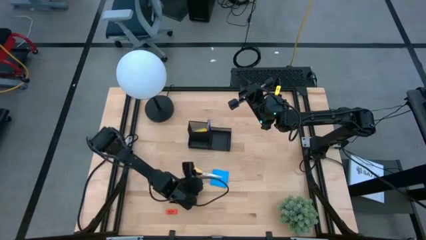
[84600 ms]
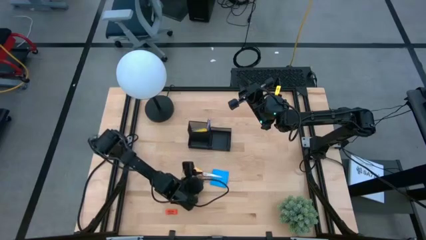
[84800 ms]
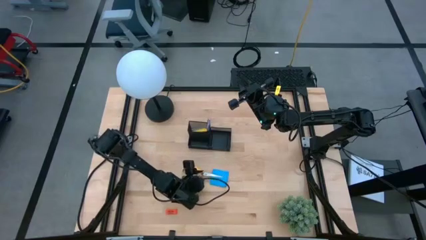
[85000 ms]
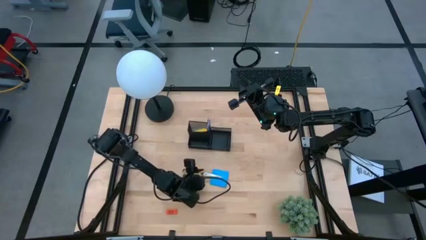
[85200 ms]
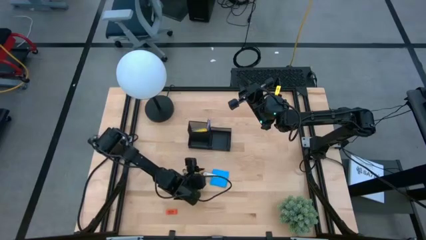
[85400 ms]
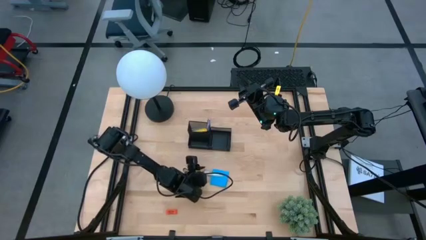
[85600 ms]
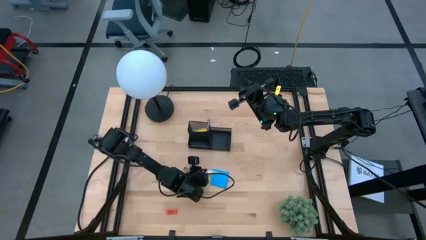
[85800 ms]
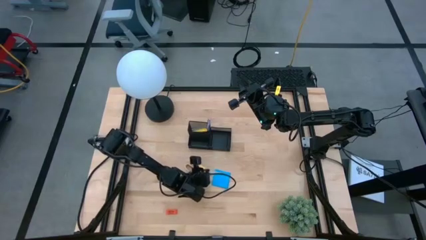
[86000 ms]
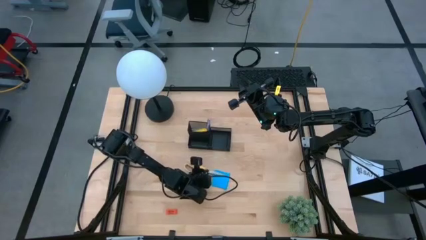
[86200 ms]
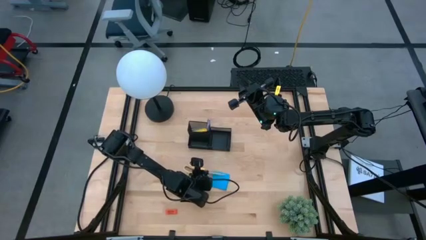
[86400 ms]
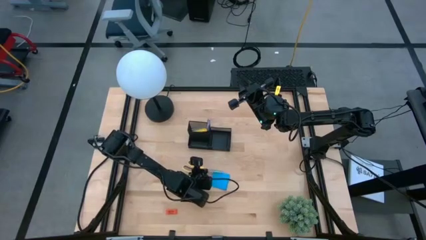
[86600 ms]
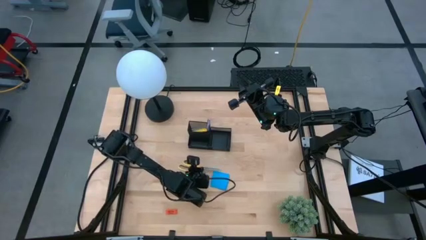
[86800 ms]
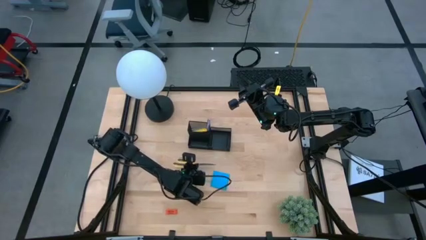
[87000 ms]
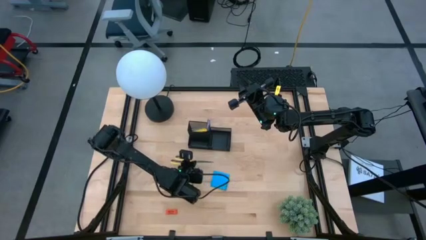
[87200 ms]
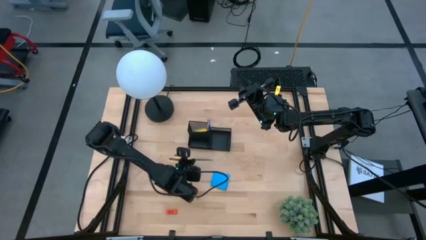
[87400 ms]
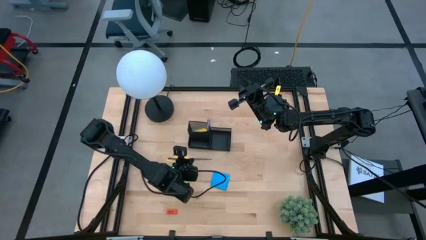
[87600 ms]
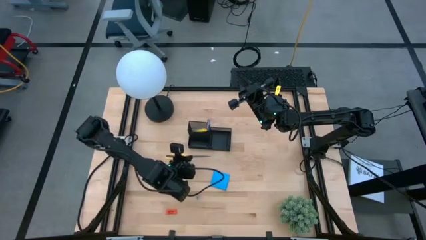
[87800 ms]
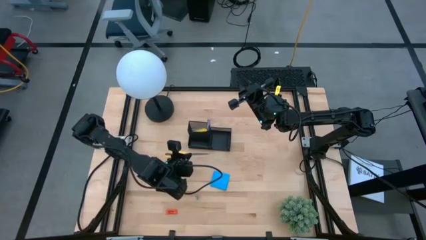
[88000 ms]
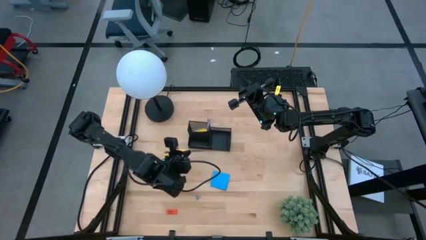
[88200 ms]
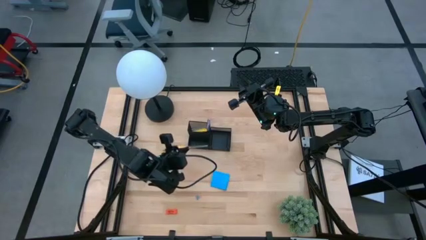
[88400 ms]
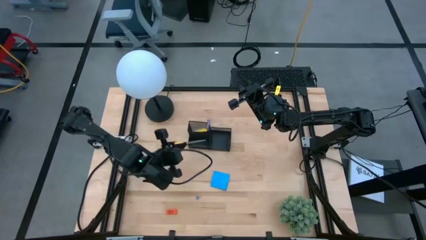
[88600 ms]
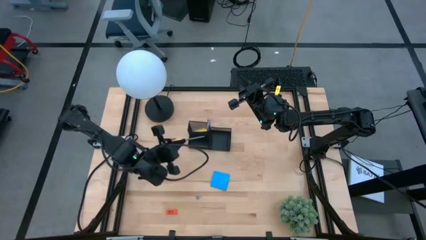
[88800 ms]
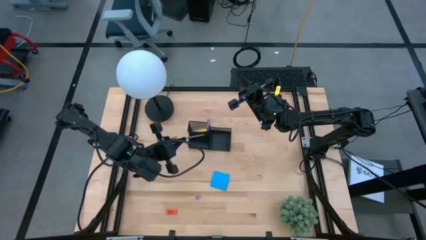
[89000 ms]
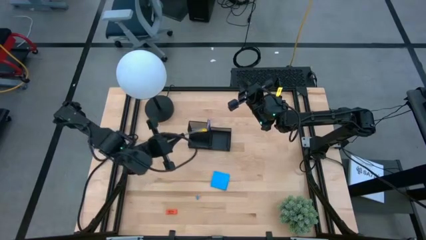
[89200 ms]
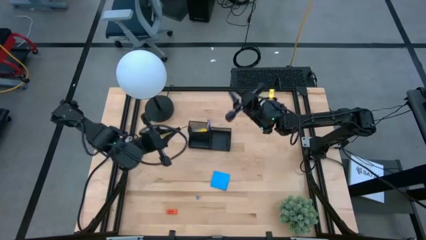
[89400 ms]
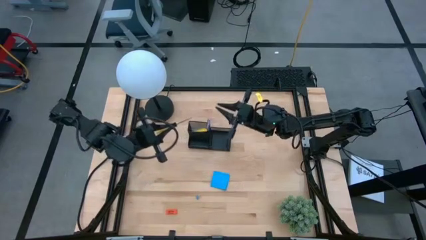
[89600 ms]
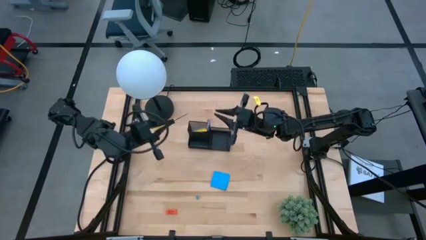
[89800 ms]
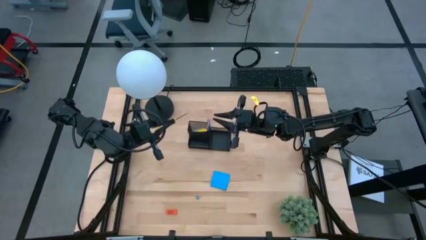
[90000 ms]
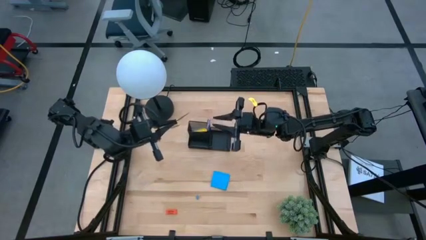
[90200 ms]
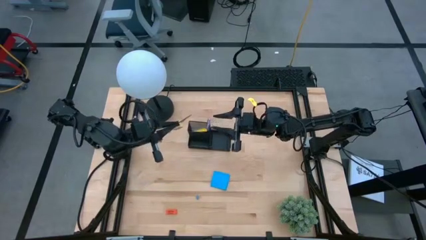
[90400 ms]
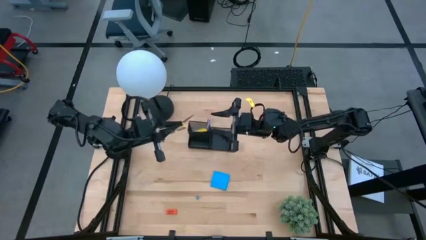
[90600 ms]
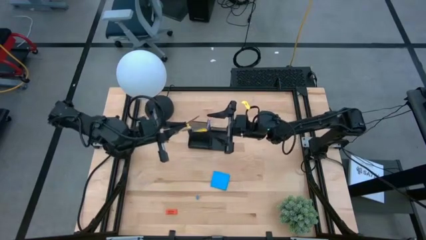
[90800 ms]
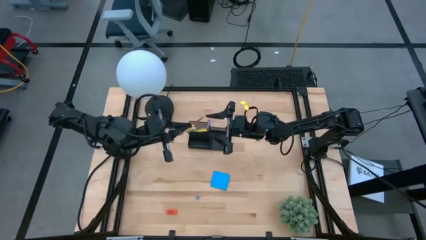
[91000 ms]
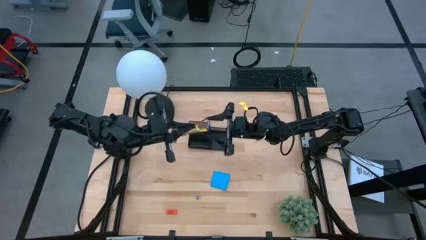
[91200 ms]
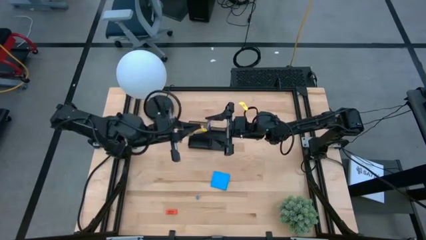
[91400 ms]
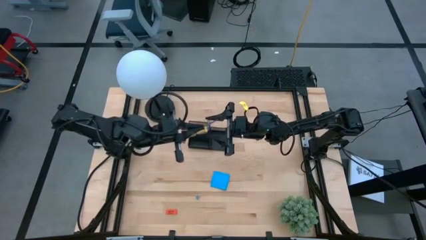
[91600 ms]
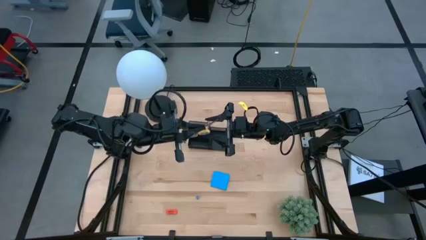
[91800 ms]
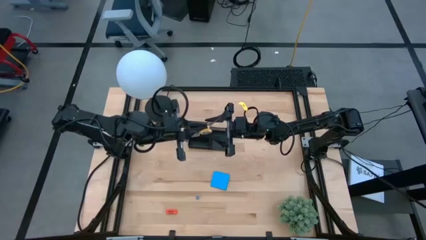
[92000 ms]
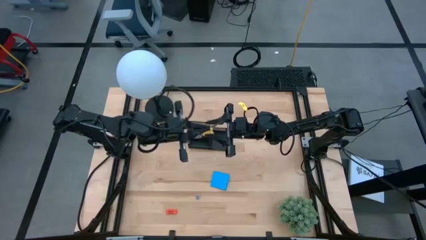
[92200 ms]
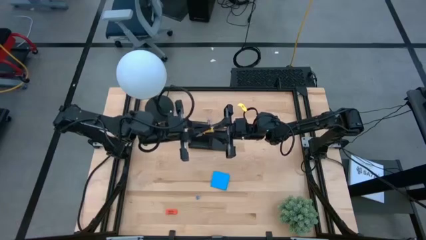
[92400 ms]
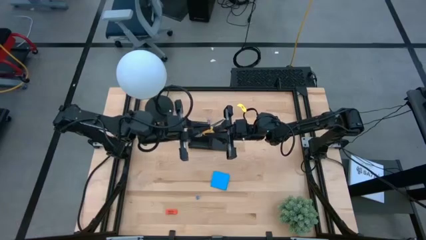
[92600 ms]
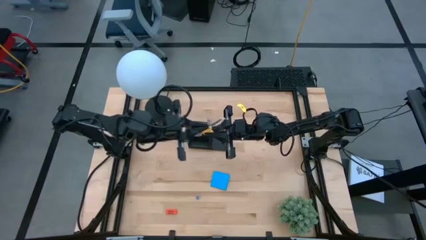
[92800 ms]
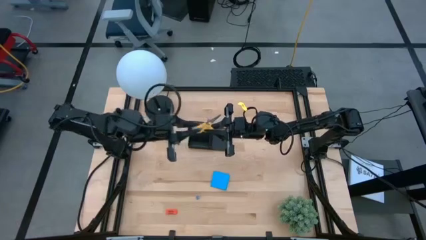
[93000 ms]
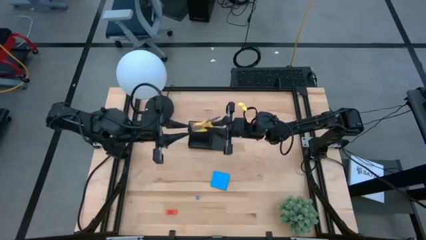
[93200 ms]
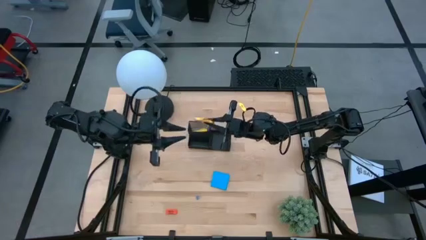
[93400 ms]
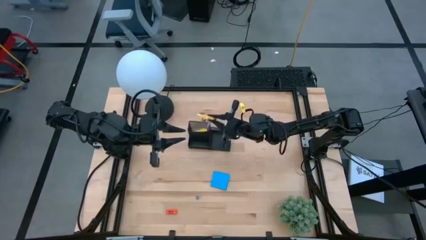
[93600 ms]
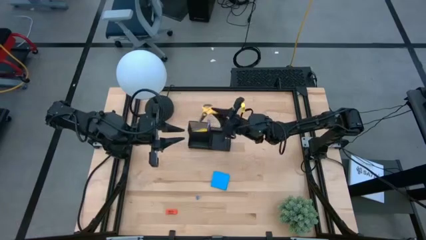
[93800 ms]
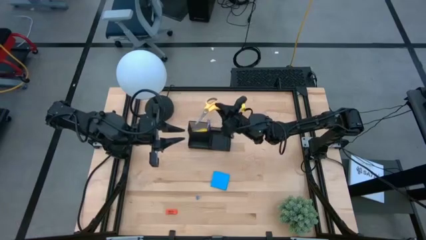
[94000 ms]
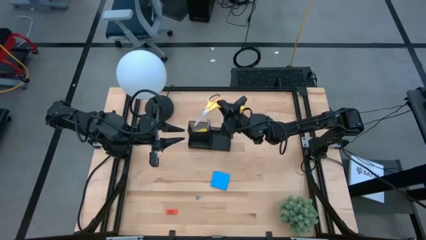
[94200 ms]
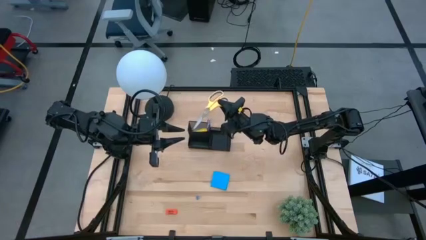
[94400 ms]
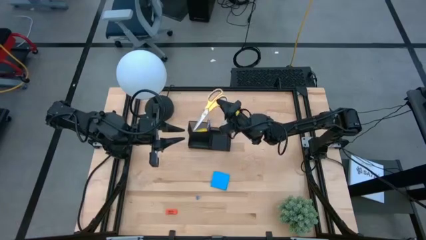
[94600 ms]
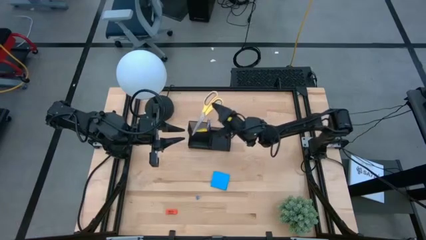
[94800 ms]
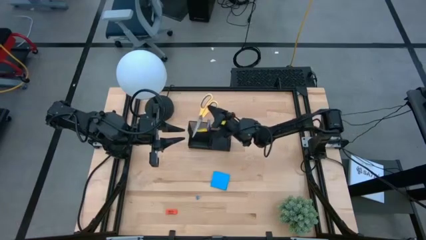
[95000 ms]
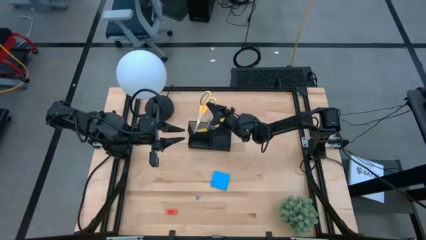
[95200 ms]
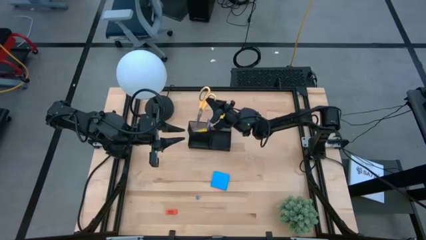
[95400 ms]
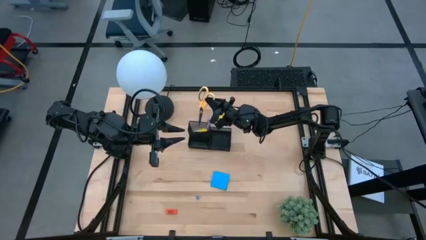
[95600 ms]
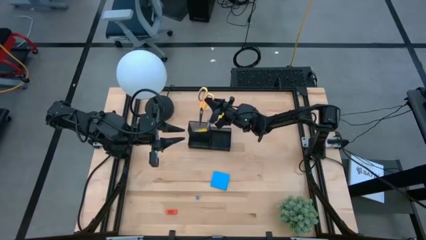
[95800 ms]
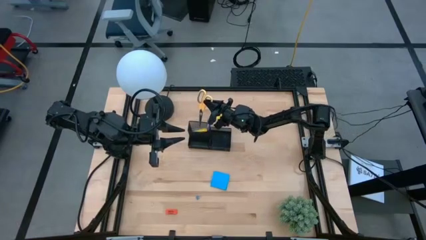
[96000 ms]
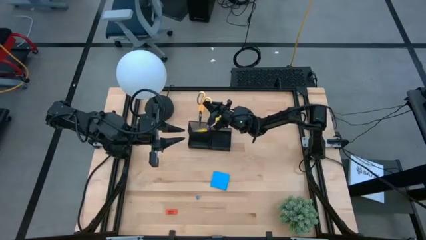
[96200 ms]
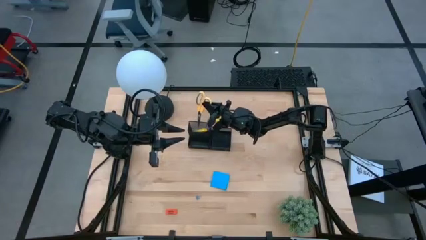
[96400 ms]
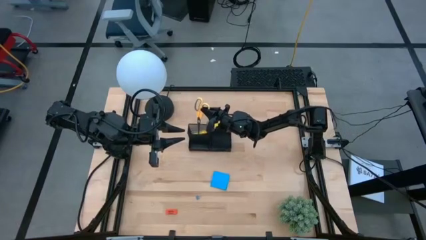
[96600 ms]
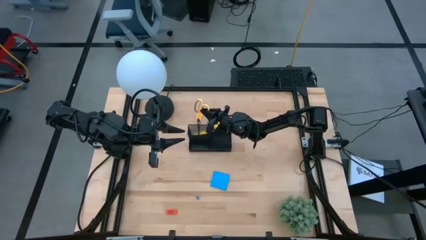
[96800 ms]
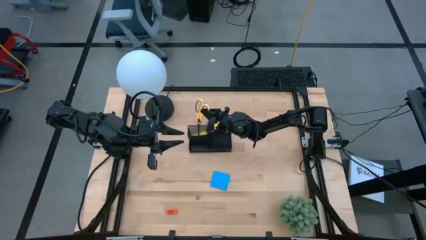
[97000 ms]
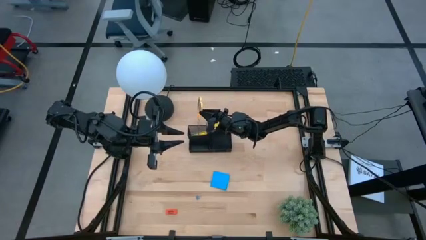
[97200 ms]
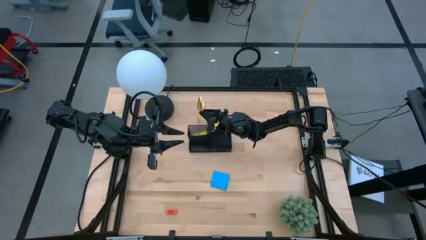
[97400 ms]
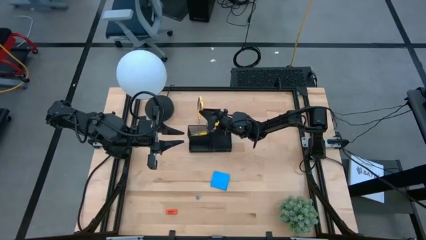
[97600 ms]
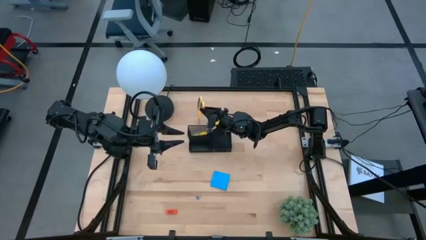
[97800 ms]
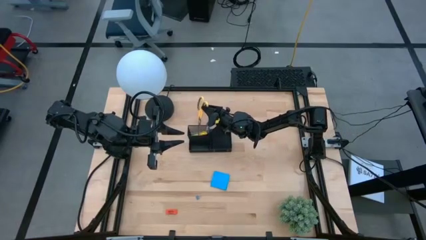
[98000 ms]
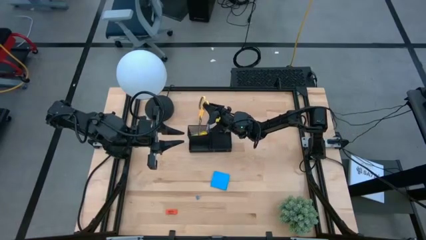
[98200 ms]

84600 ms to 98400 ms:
Task: Pick and place office supplies into organizer
Put the yellow scissors into the black mesh desk organizer
